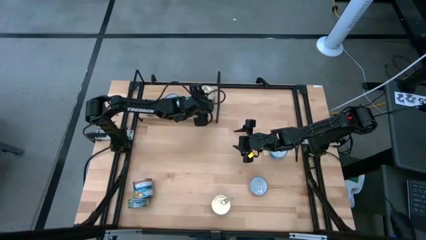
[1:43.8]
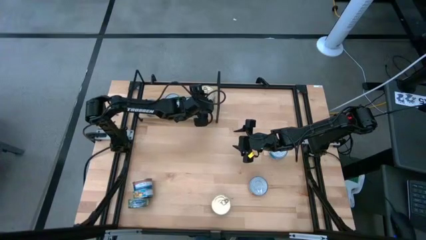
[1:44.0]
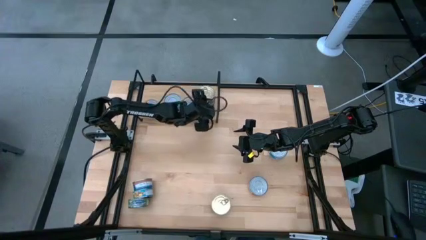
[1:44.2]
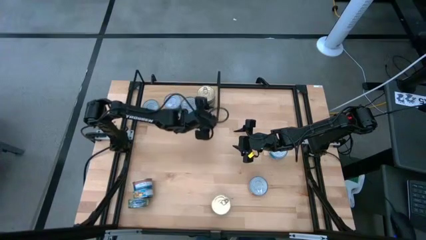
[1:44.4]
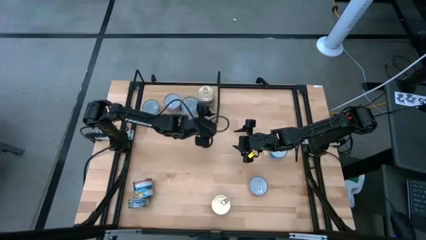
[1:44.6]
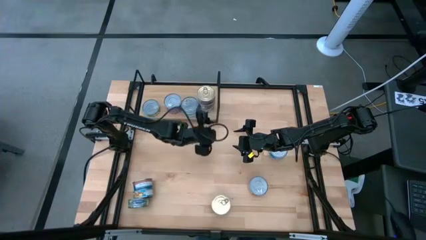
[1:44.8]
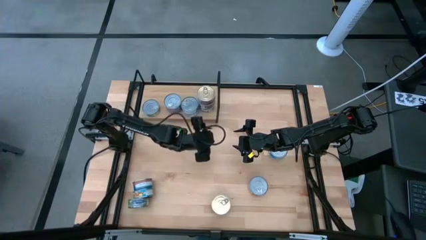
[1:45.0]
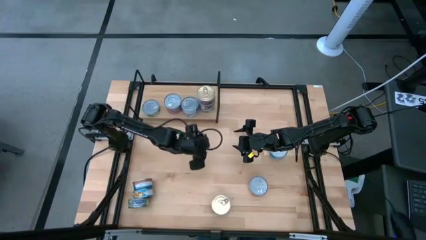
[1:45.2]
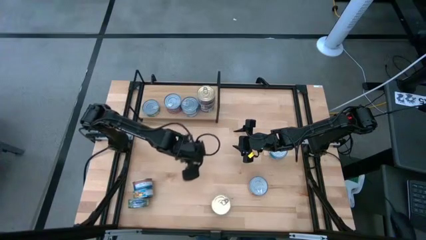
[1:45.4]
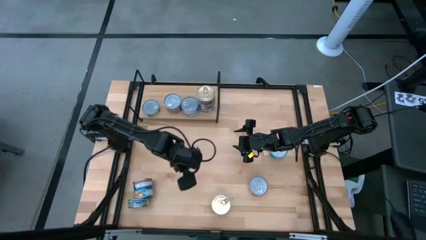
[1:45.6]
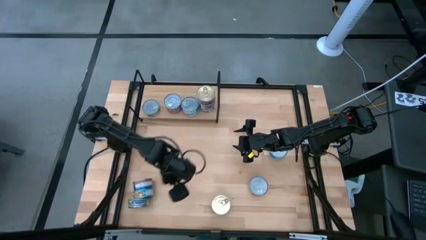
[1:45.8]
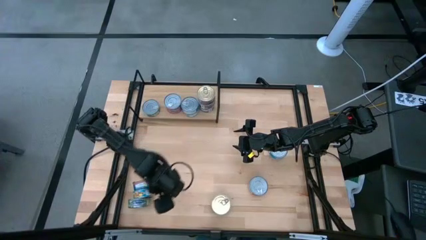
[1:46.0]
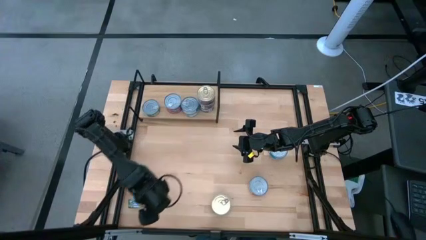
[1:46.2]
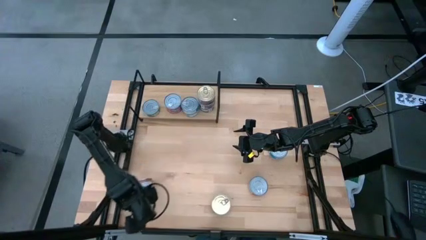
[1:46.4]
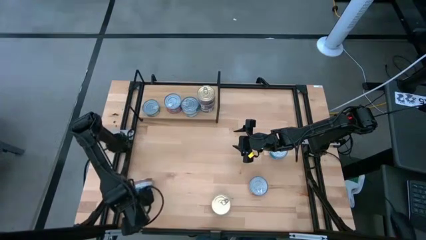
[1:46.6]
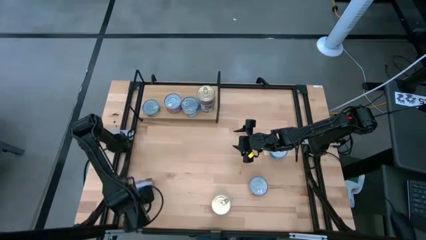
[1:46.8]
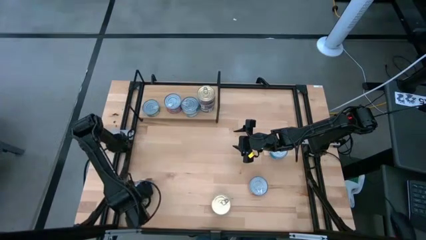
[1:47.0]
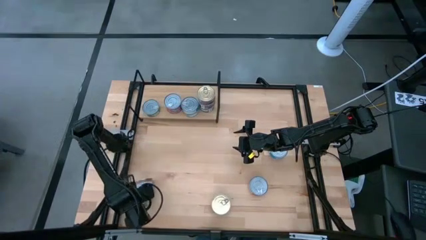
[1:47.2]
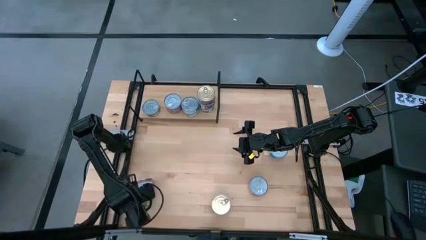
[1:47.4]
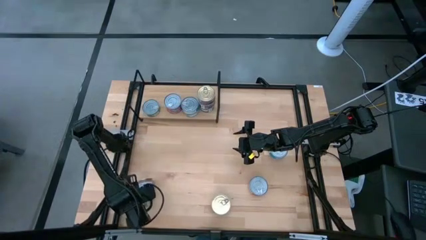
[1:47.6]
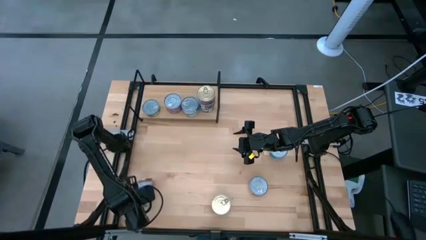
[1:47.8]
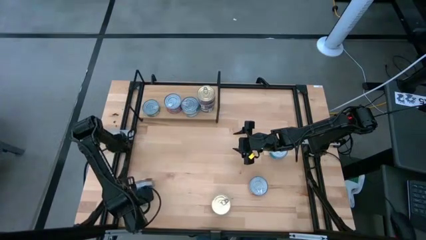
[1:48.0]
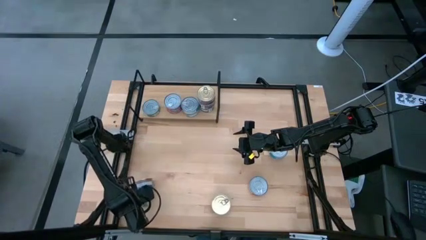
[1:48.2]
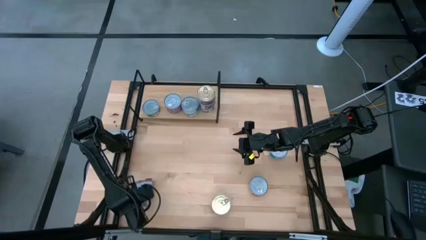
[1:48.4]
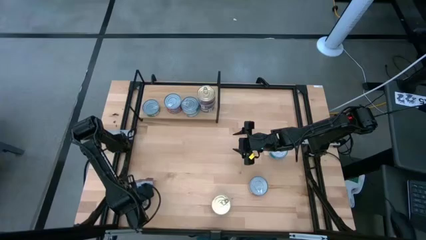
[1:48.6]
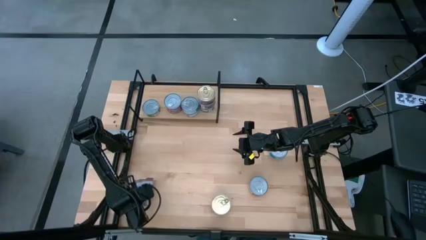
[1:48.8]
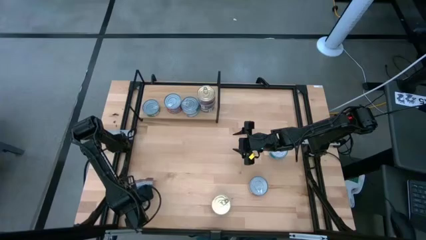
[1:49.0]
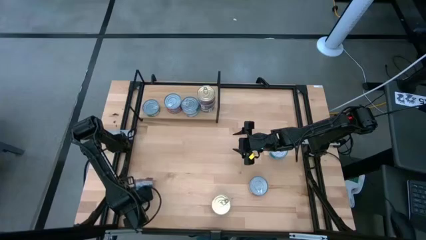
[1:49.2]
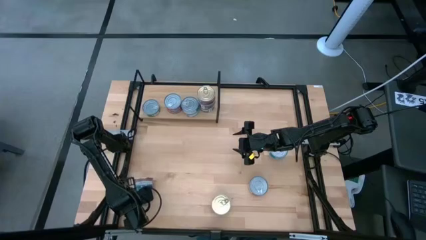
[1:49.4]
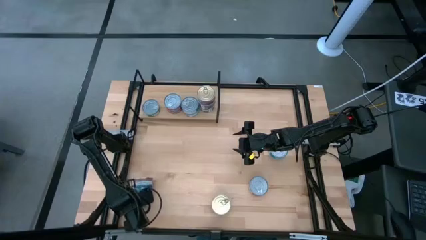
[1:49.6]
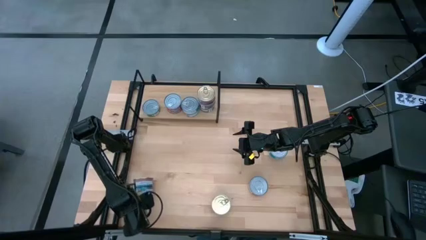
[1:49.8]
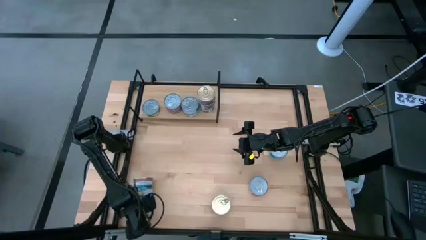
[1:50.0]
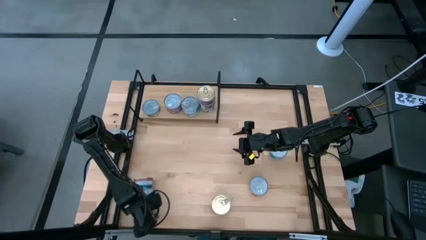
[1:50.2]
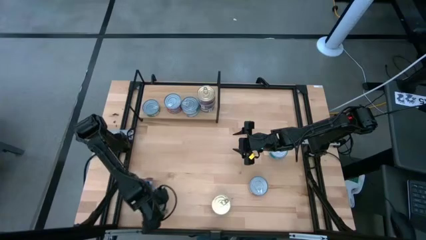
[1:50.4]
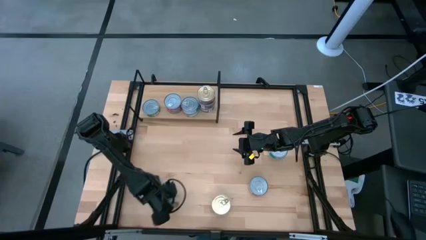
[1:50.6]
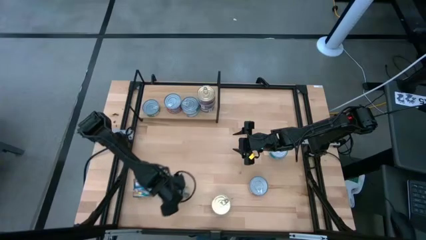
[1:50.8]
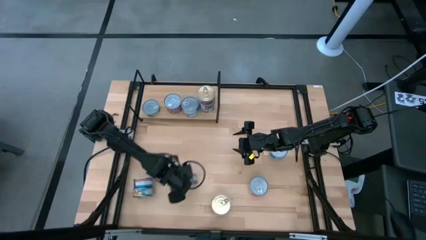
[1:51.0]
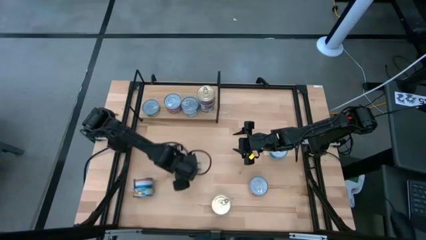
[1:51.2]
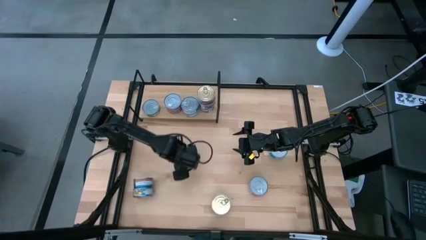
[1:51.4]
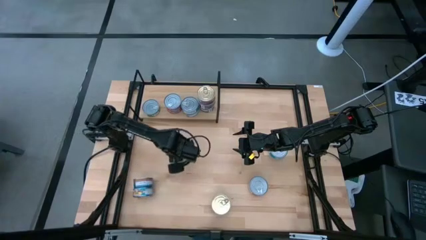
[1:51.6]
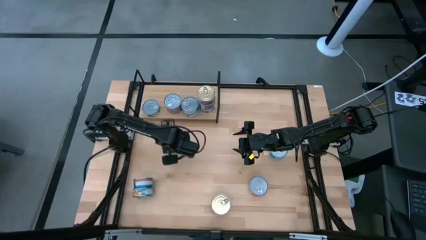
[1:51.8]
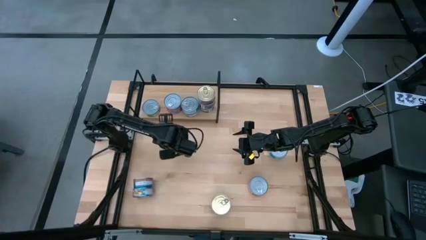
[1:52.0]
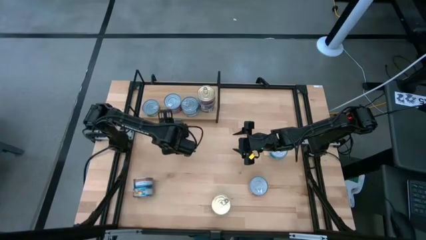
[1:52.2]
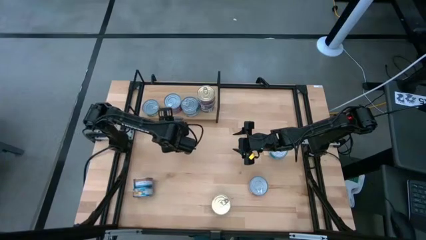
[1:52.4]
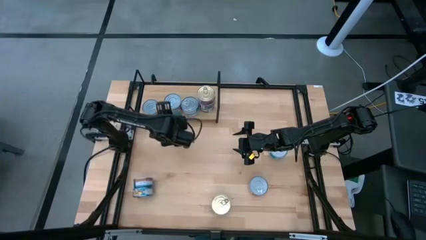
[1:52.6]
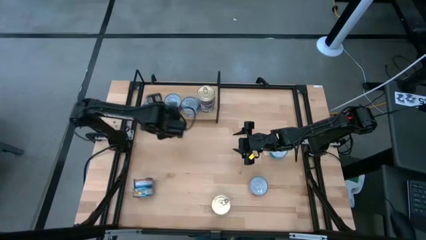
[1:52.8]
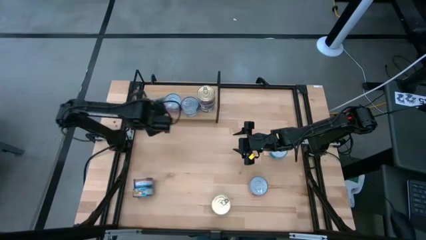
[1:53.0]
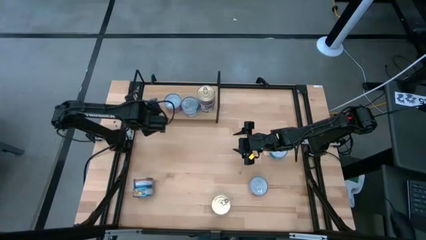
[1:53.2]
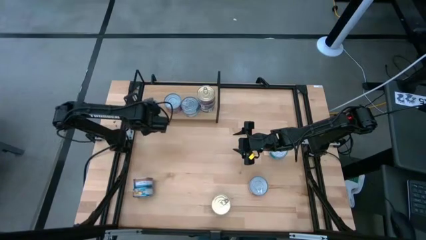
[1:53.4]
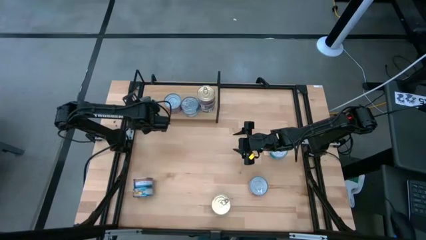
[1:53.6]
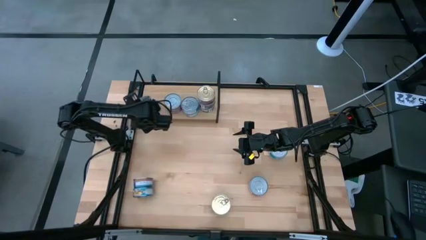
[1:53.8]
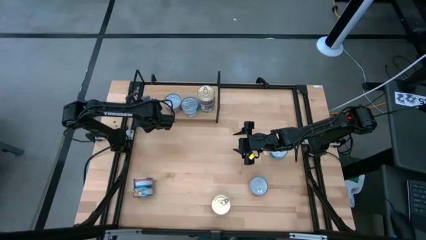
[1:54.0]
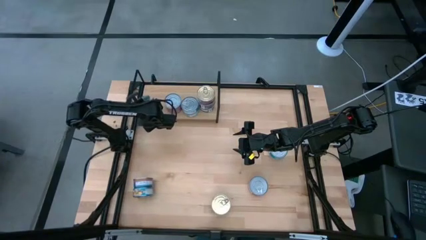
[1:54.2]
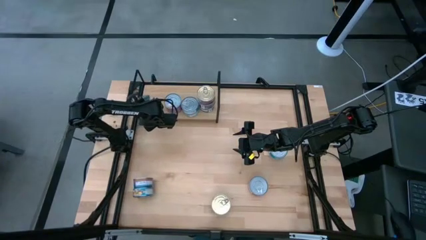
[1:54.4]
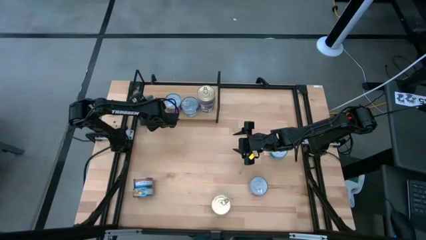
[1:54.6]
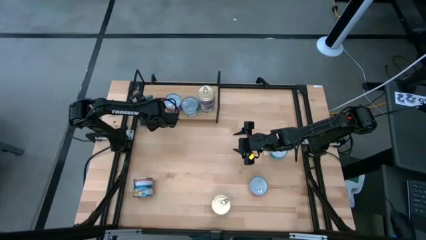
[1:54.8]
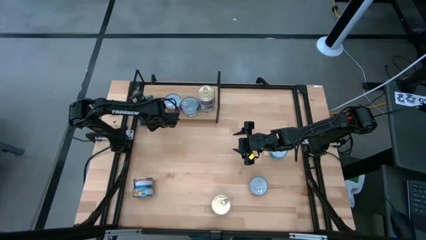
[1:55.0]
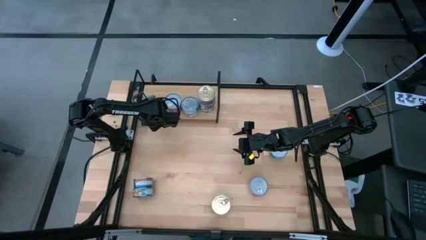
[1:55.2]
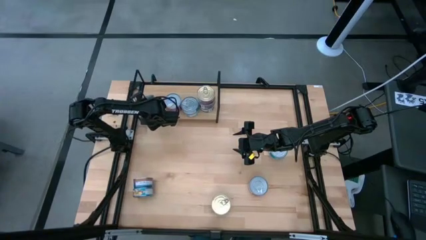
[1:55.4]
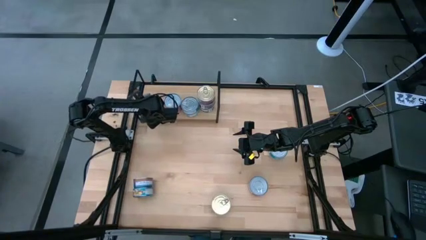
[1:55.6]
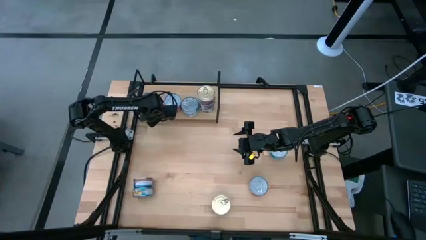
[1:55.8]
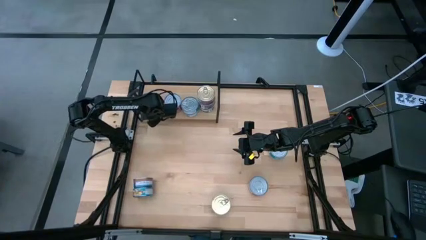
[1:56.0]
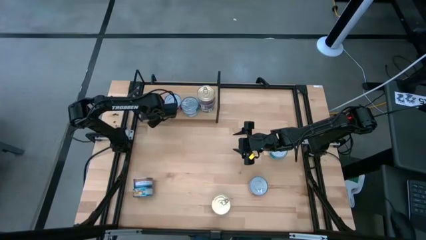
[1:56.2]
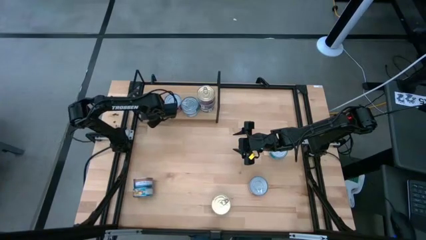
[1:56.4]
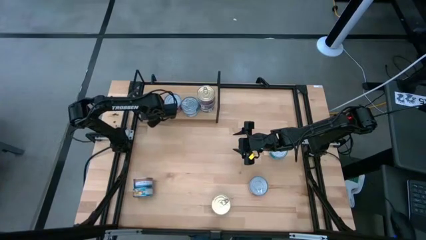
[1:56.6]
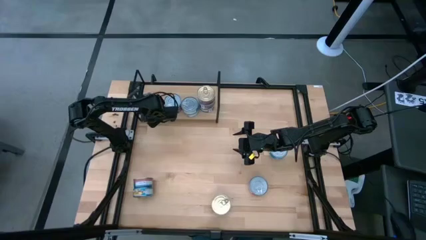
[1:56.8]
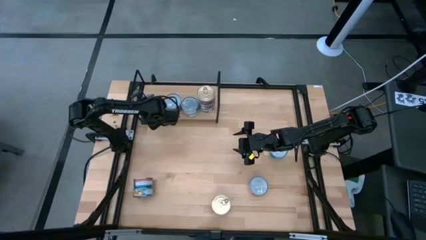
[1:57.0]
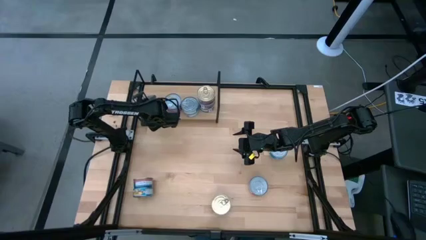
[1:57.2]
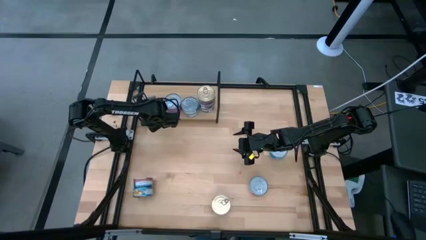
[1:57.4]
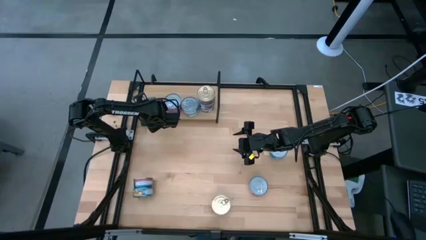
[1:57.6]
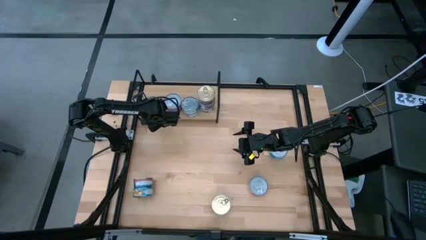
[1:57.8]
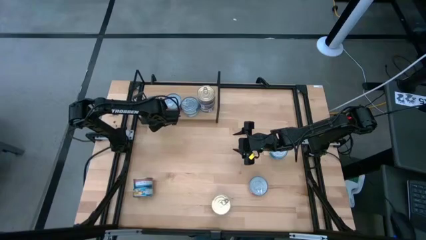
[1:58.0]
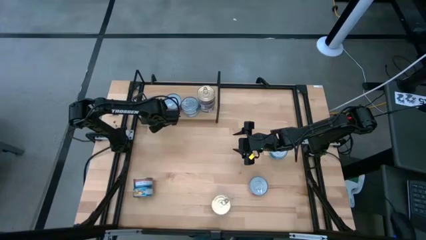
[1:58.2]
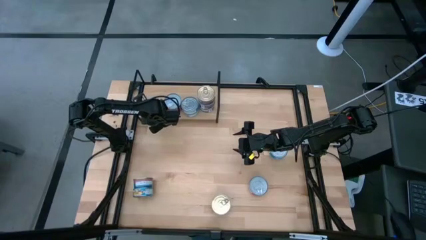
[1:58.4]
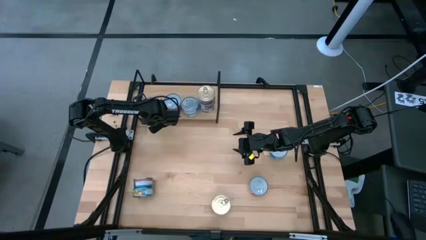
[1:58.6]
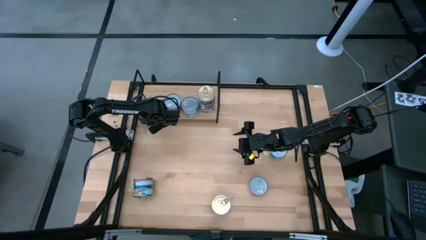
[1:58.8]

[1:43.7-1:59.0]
Task: Stack canned seafood by type on shelf
Stack the green tuna can on top of the green tuna can on the shelf
